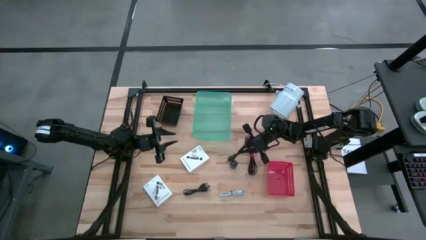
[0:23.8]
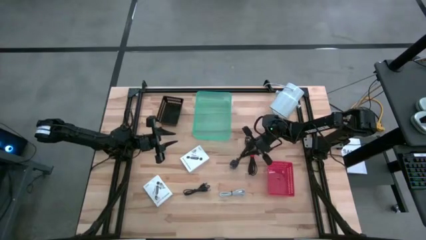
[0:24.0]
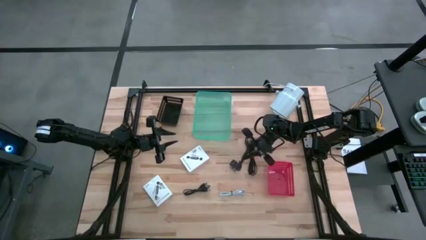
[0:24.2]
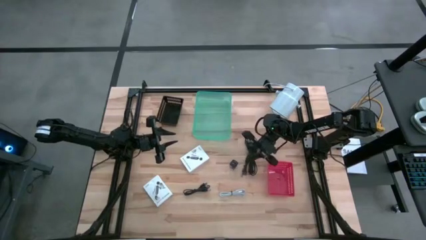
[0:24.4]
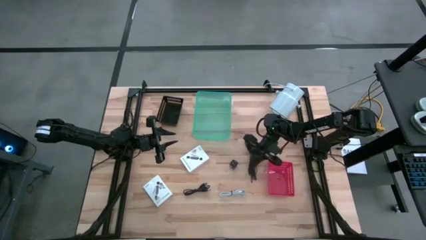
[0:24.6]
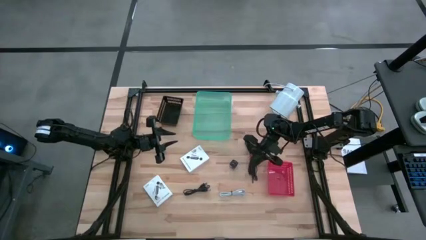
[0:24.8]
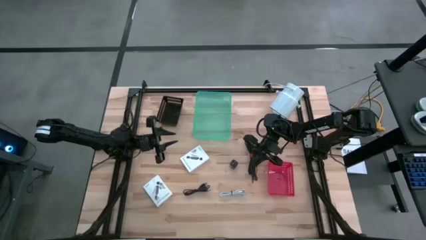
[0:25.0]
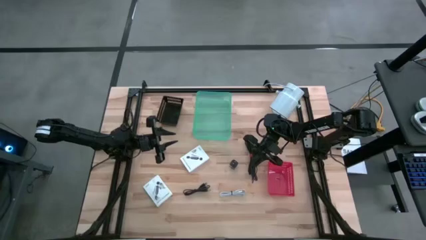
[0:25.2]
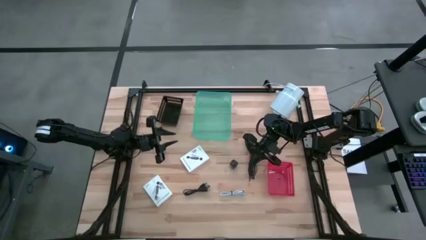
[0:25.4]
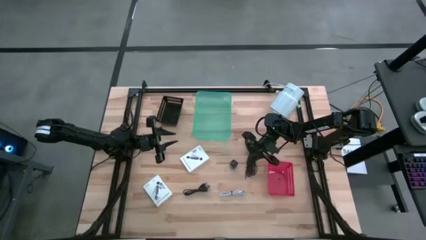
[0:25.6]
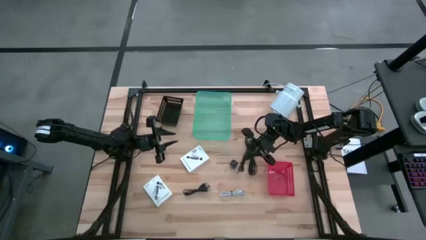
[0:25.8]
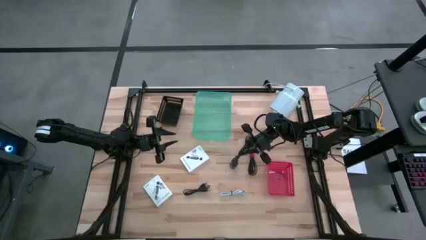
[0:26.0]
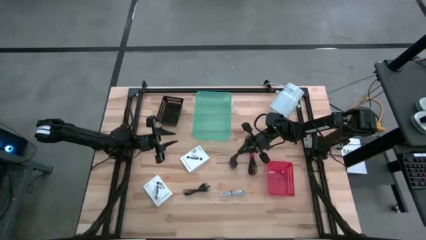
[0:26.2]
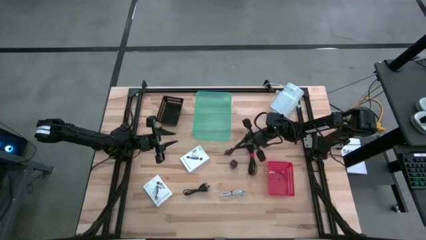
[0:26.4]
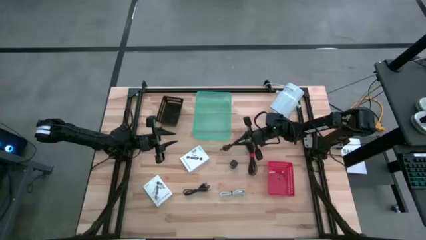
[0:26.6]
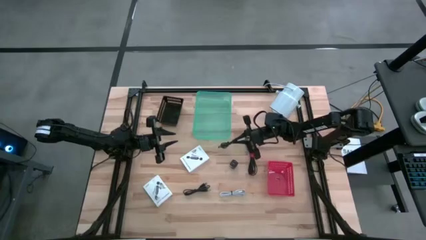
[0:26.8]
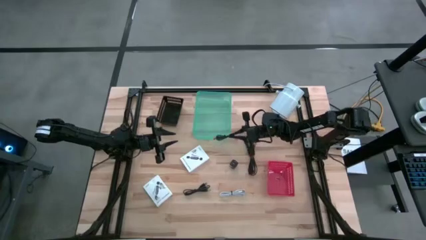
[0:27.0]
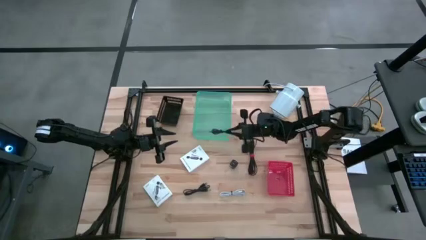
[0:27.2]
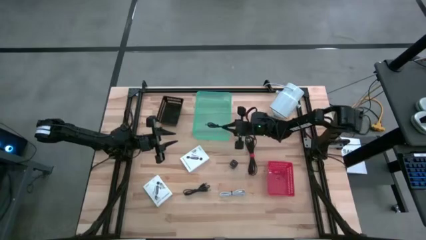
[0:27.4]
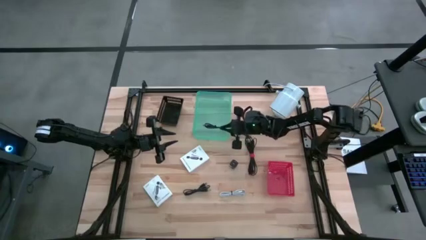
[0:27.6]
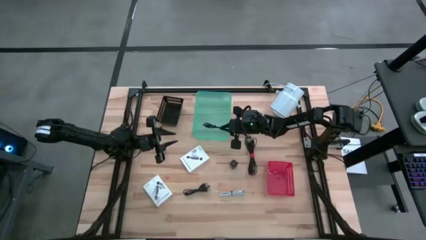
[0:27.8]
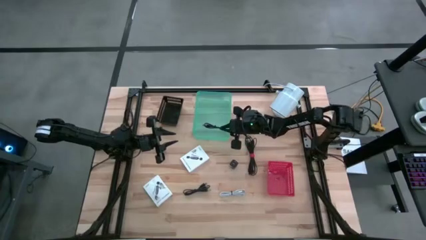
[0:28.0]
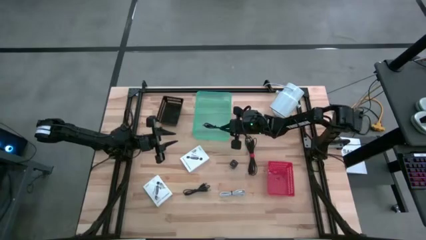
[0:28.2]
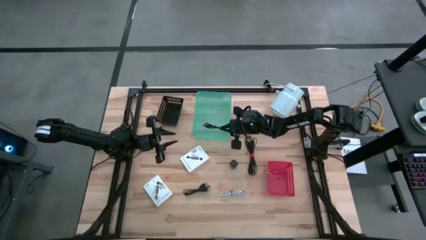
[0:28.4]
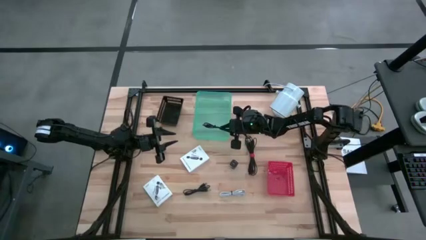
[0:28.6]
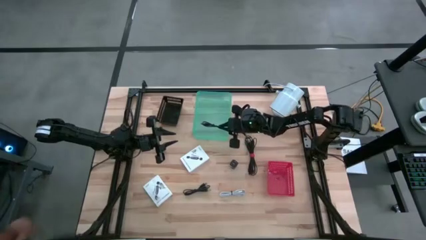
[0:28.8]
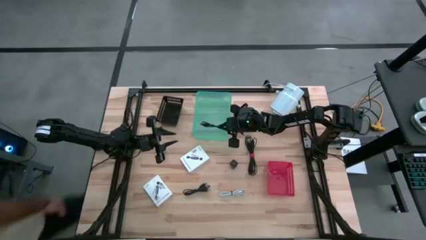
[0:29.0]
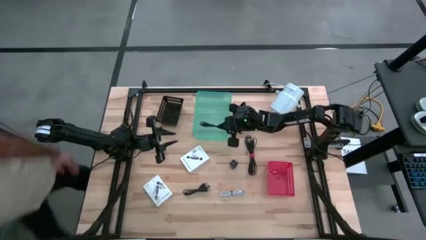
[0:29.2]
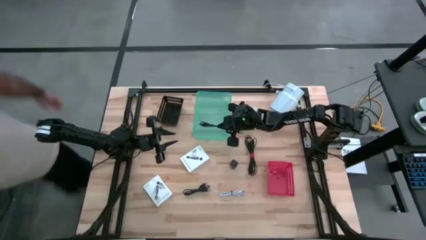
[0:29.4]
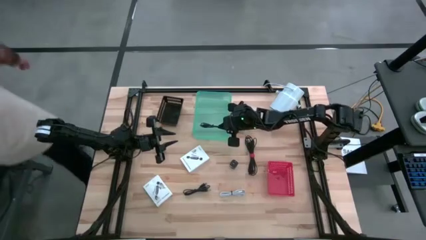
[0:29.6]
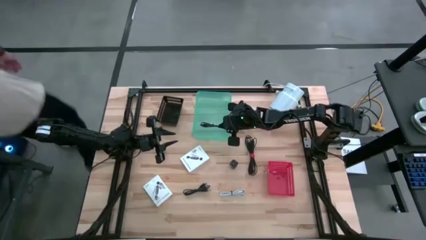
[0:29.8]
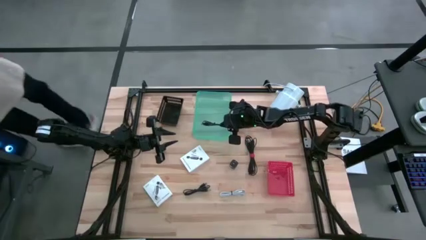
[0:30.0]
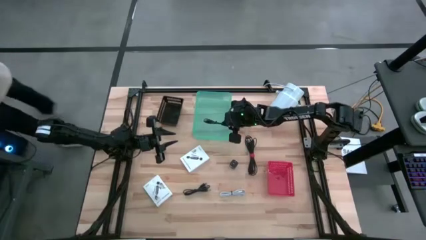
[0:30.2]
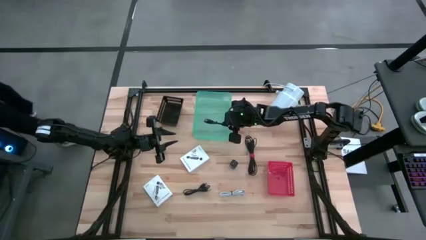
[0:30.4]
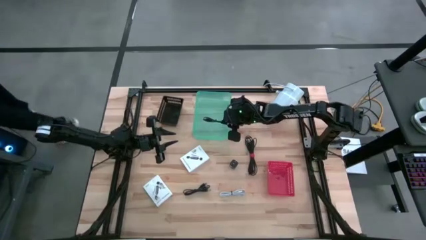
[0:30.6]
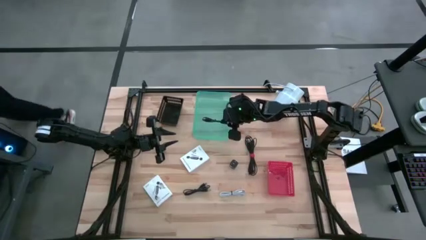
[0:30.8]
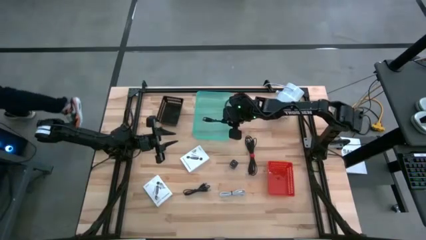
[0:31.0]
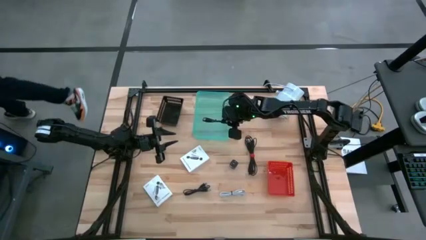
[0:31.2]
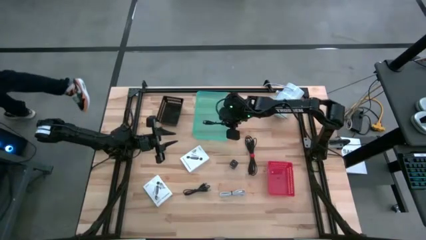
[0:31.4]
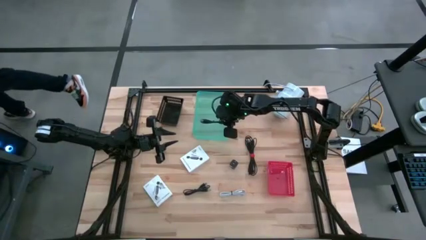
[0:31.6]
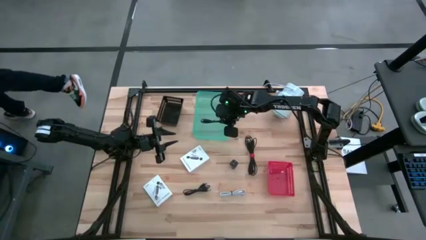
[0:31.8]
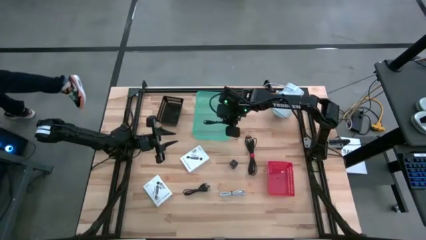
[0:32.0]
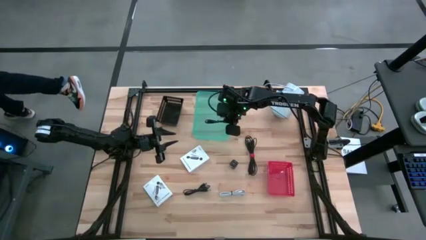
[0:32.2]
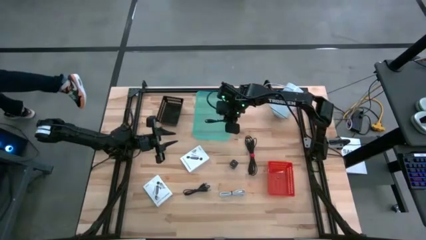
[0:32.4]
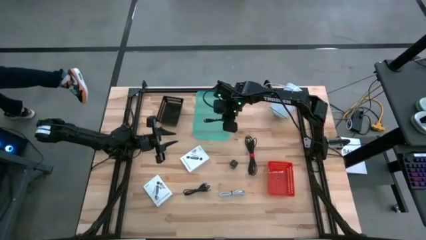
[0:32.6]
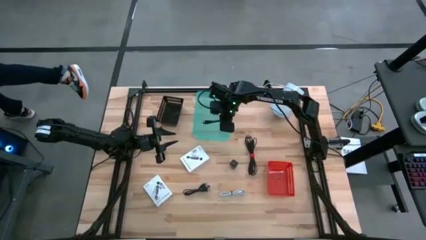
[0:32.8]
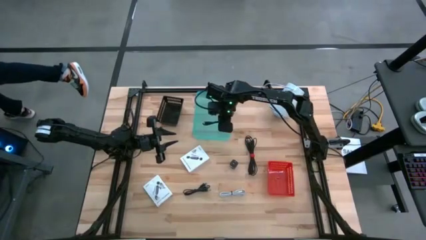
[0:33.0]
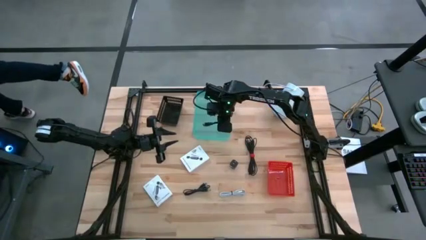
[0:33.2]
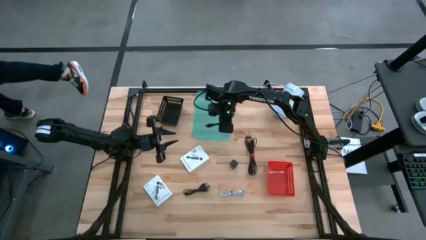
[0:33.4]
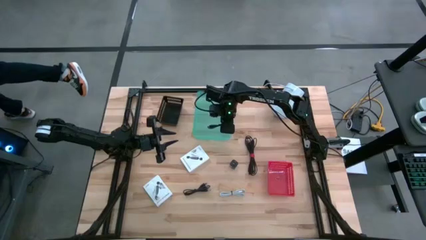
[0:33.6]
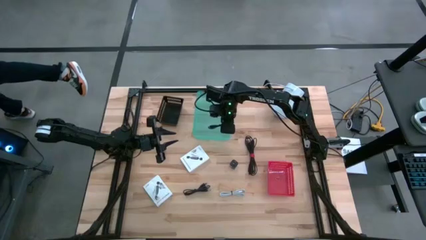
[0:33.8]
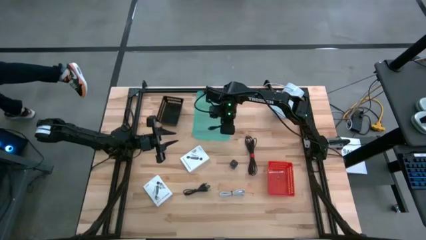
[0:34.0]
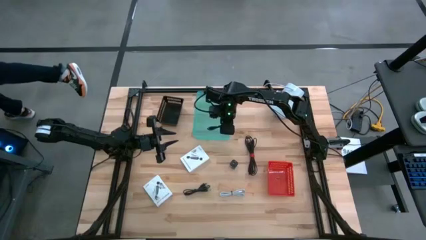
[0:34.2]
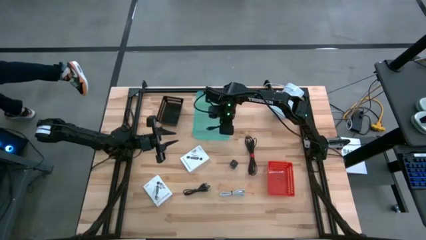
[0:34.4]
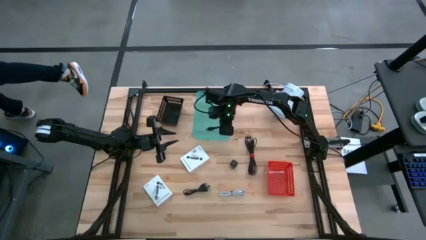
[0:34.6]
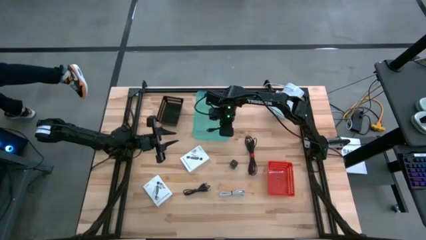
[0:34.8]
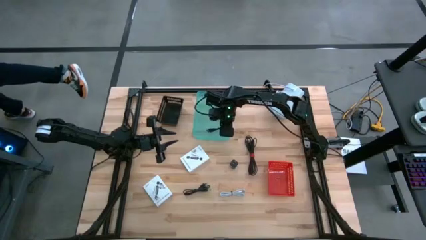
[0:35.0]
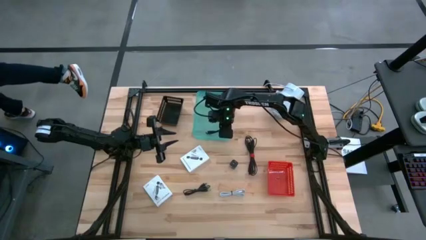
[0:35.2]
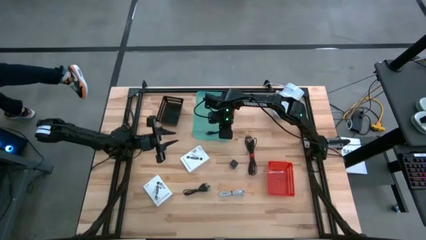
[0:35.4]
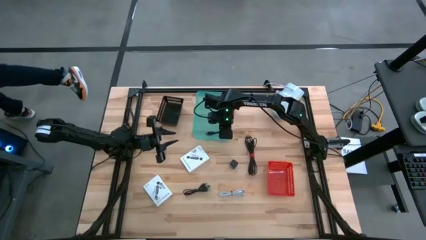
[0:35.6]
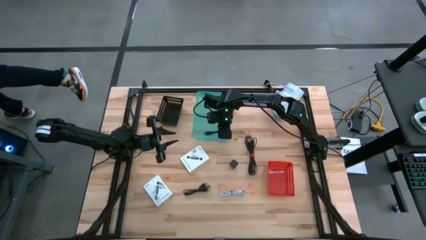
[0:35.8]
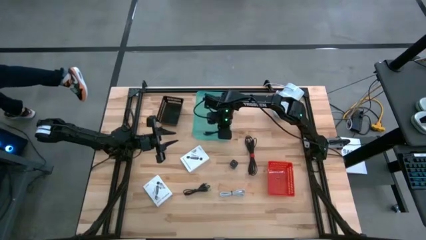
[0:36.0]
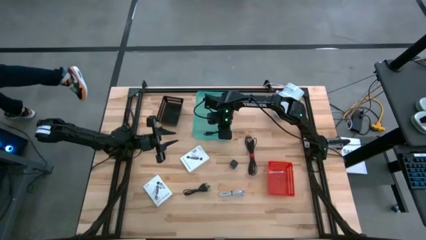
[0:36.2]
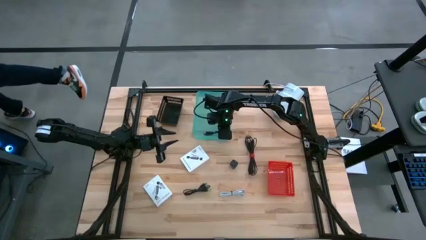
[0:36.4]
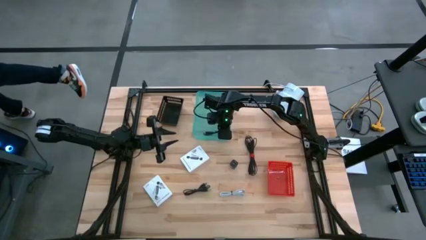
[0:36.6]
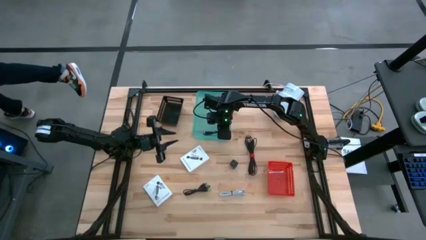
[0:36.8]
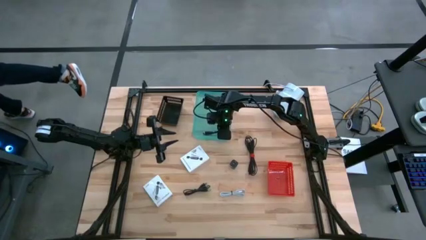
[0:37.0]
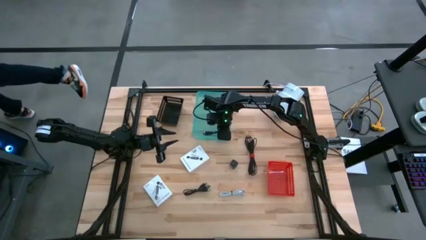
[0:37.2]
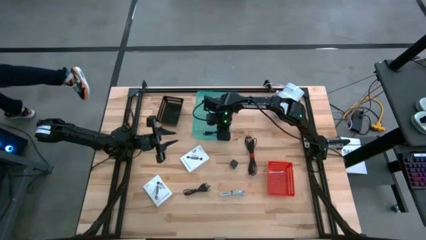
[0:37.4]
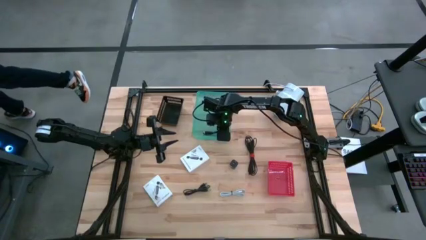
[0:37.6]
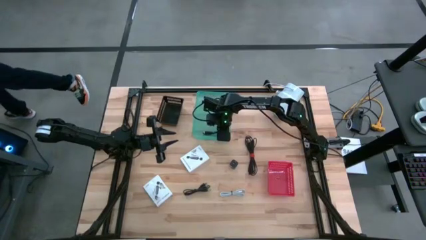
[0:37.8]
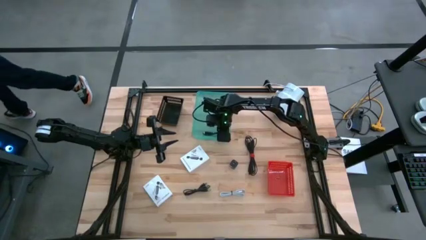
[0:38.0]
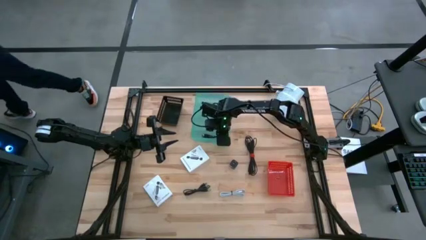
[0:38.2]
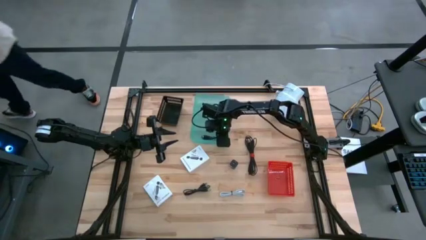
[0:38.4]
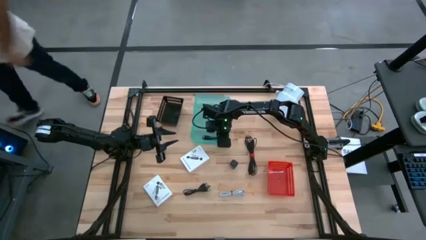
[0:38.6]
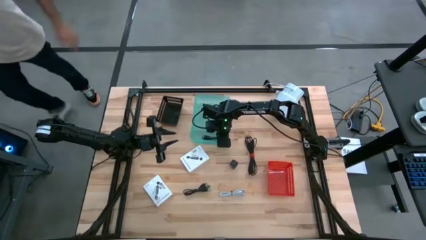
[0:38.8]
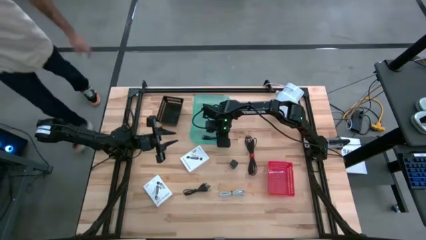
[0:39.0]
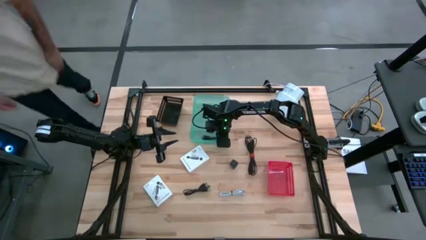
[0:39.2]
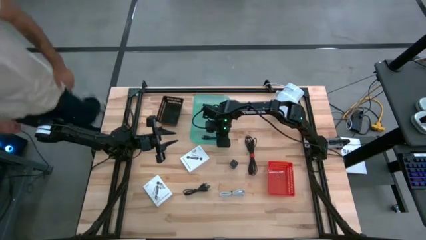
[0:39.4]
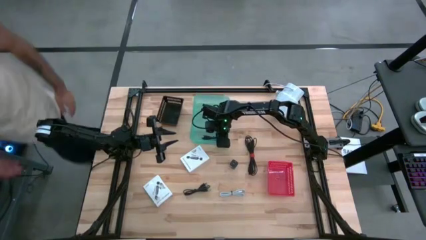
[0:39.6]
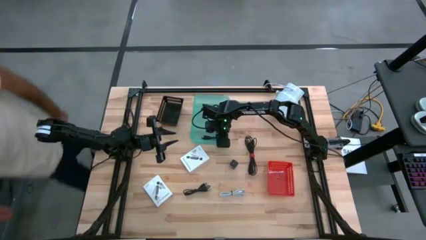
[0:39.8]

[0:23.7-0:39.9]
Task: Pick and place items into bin
Put the top black charger cable into the green bin
